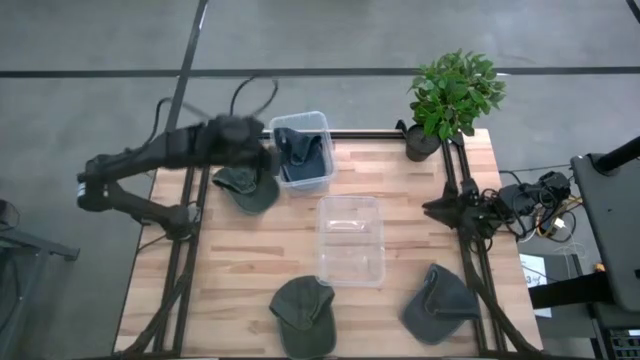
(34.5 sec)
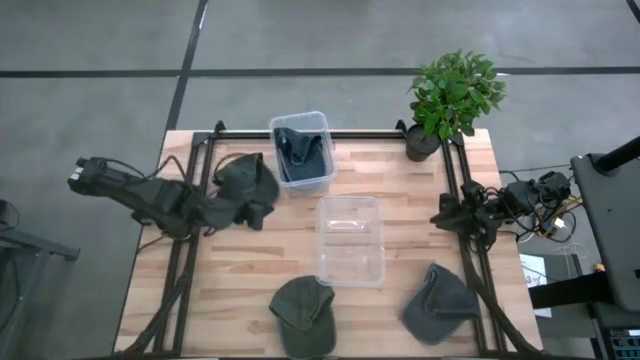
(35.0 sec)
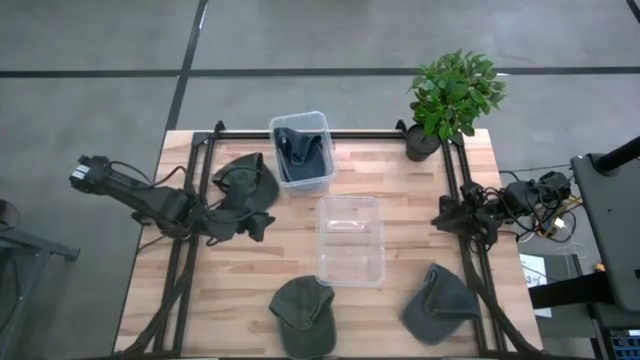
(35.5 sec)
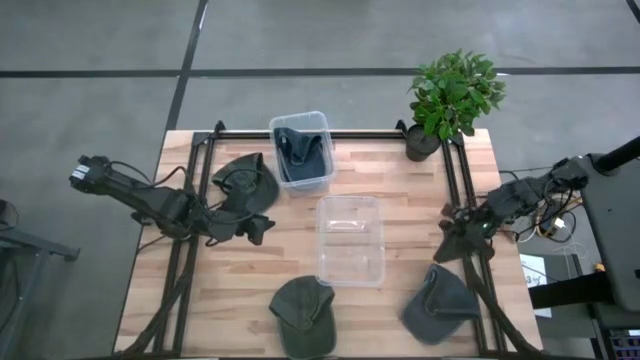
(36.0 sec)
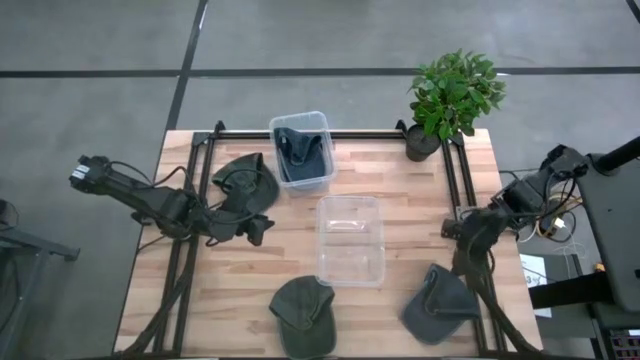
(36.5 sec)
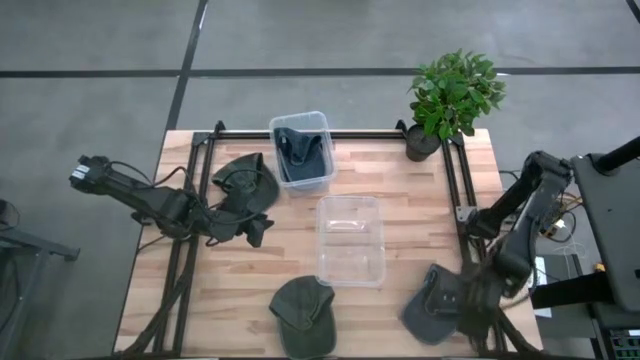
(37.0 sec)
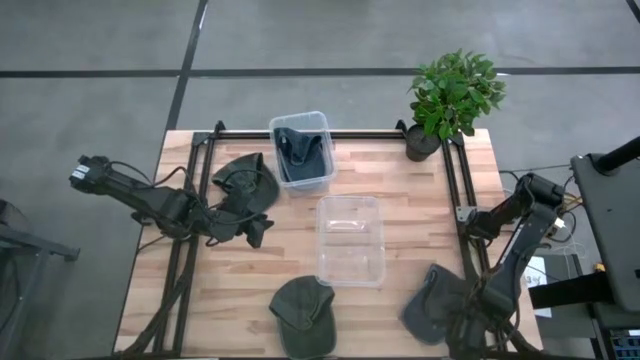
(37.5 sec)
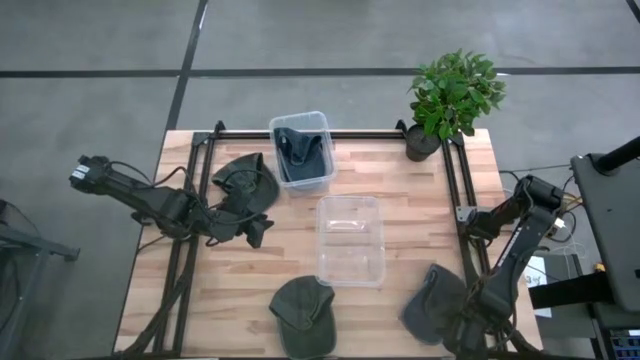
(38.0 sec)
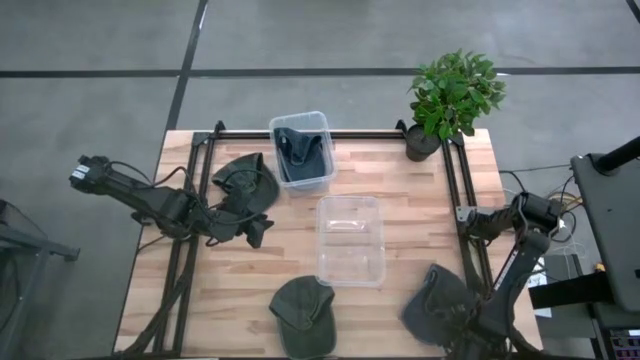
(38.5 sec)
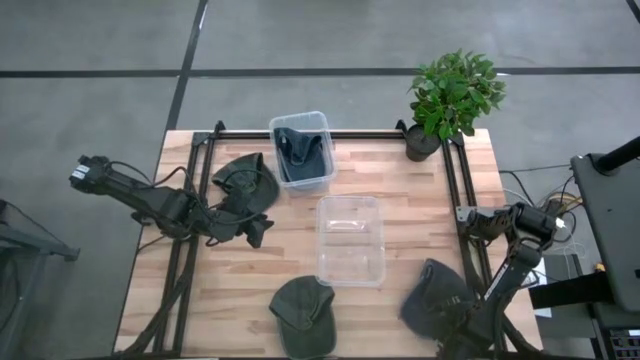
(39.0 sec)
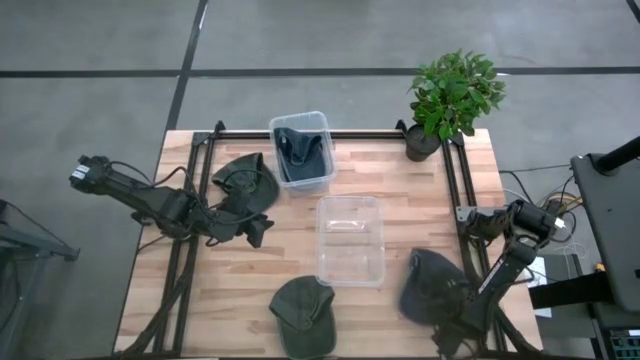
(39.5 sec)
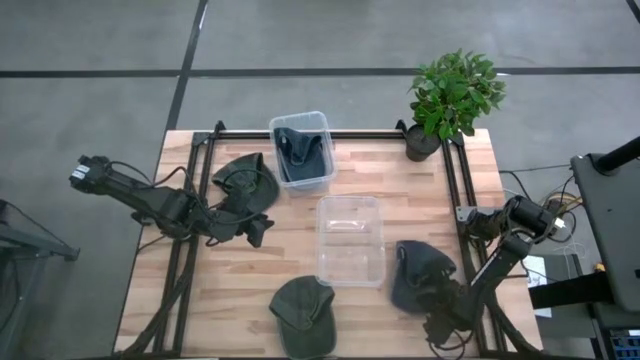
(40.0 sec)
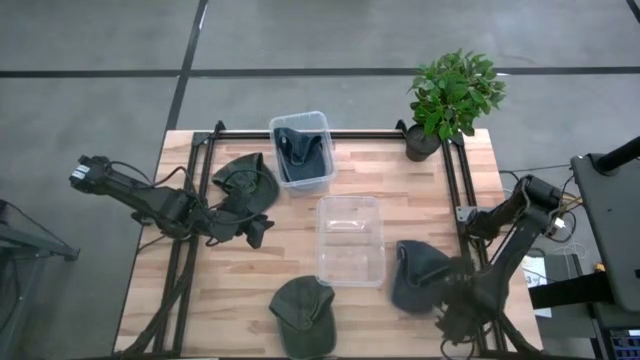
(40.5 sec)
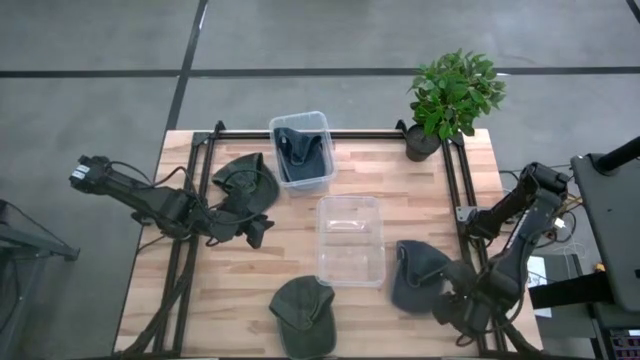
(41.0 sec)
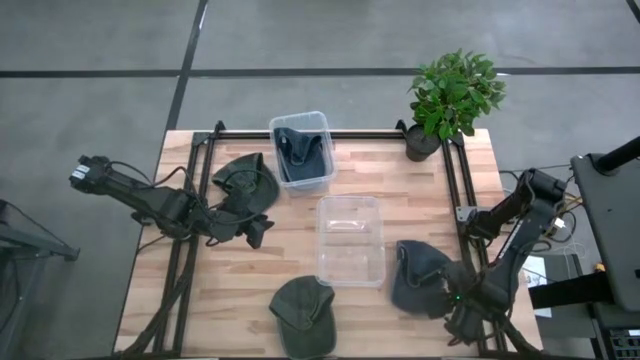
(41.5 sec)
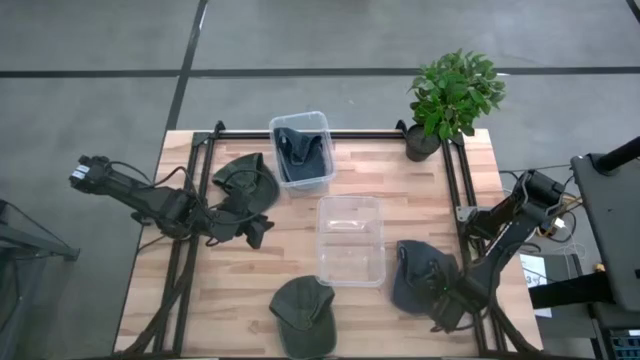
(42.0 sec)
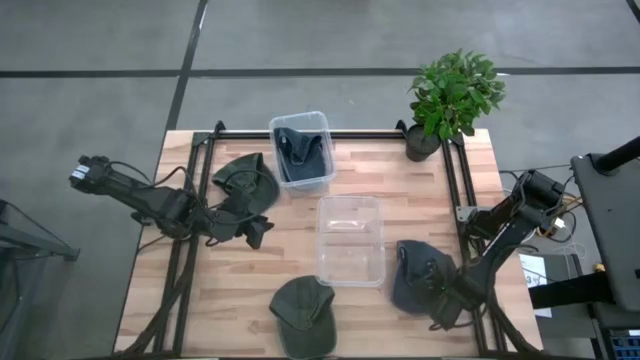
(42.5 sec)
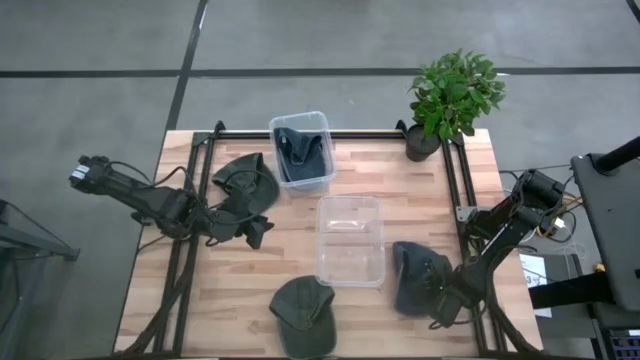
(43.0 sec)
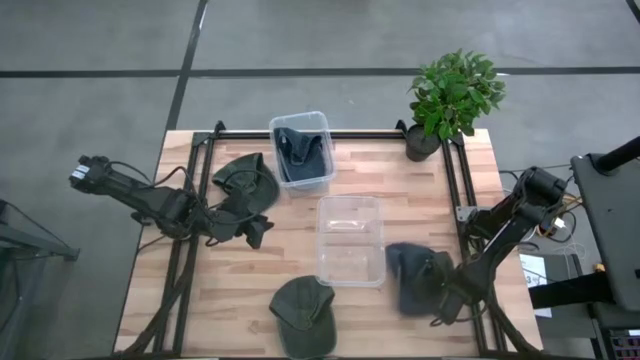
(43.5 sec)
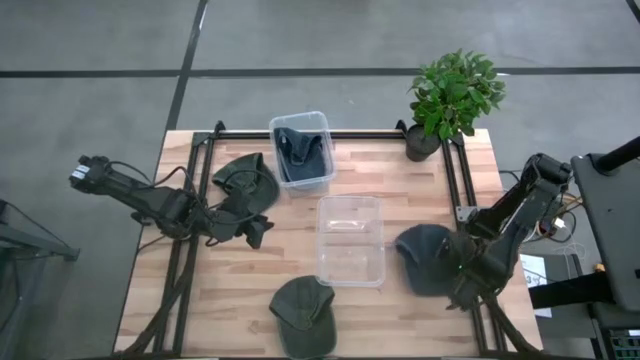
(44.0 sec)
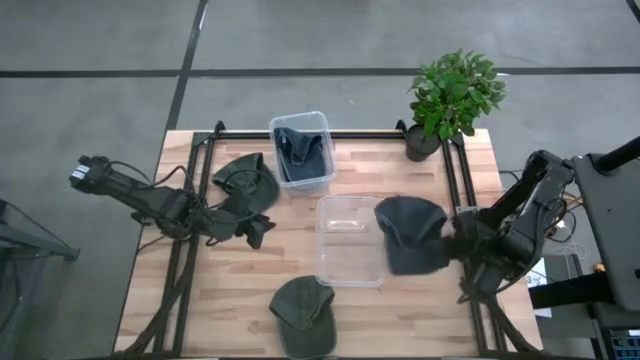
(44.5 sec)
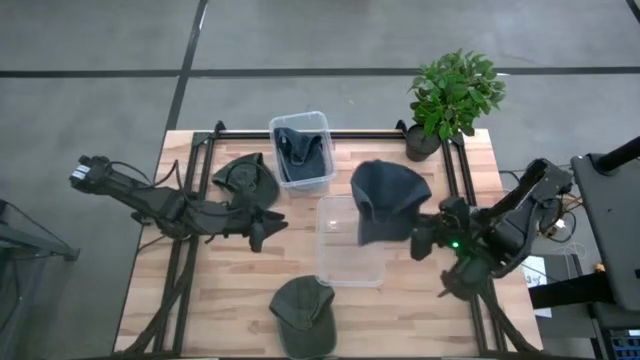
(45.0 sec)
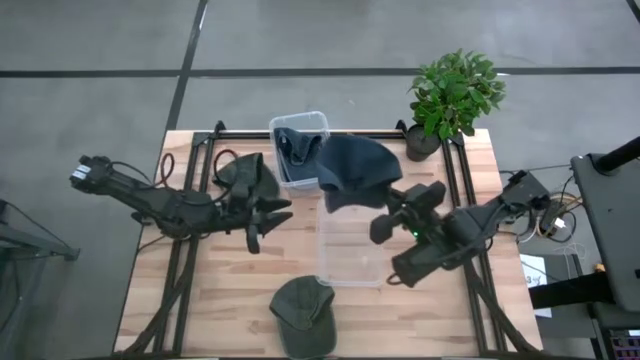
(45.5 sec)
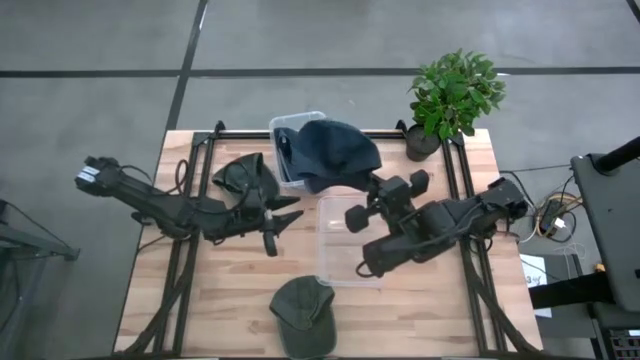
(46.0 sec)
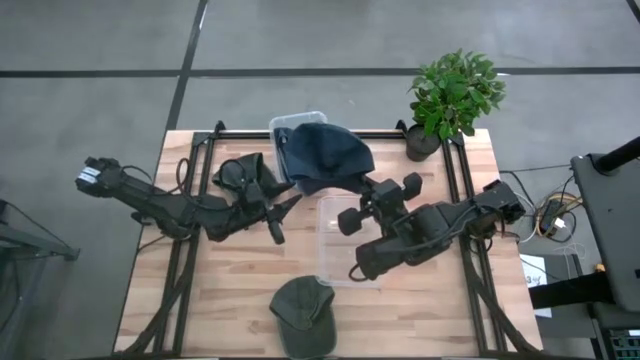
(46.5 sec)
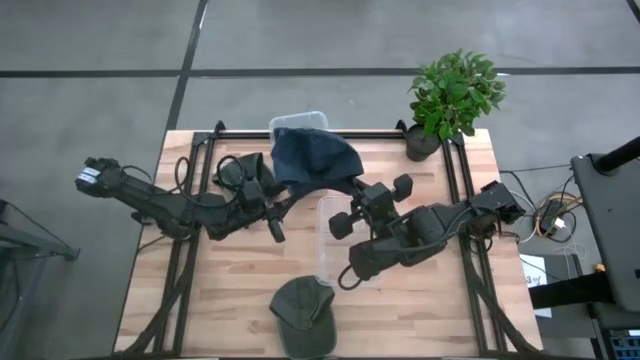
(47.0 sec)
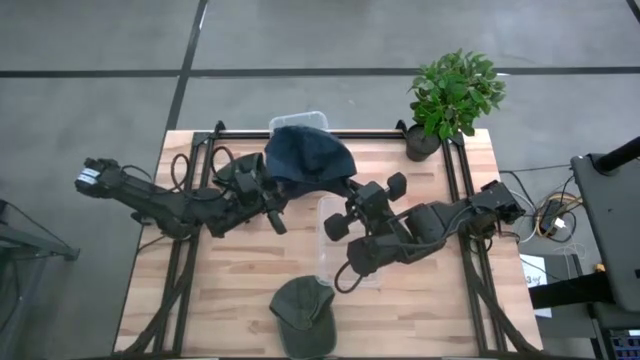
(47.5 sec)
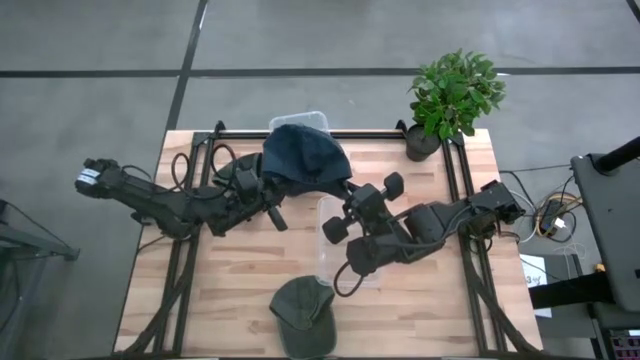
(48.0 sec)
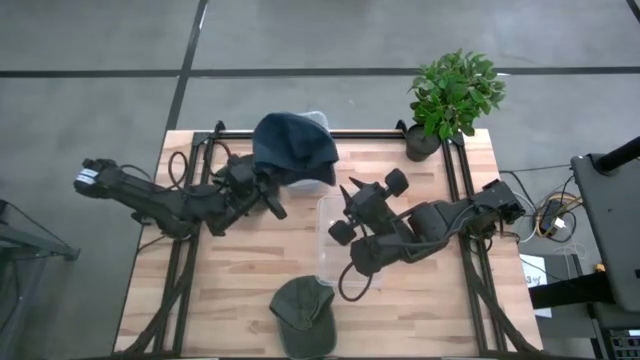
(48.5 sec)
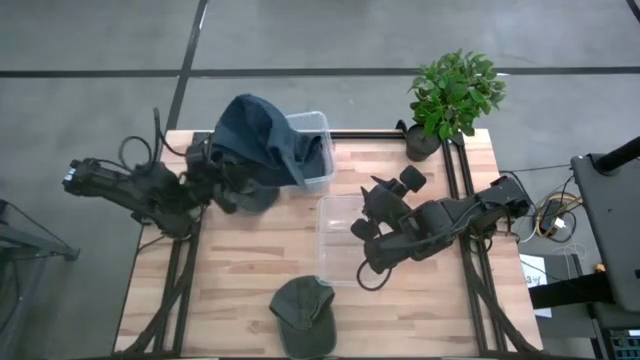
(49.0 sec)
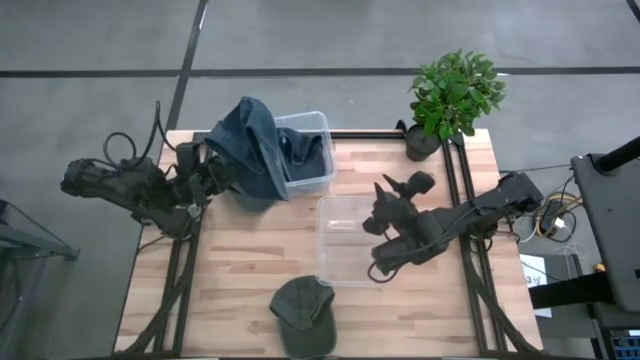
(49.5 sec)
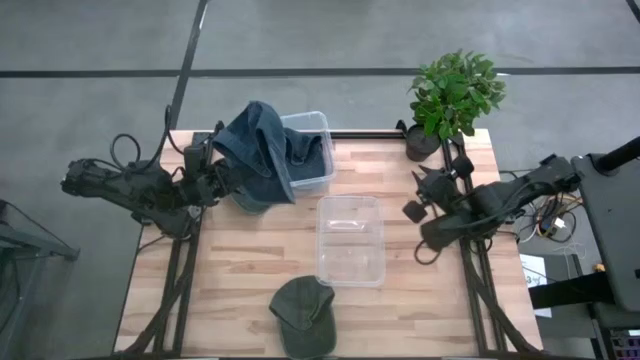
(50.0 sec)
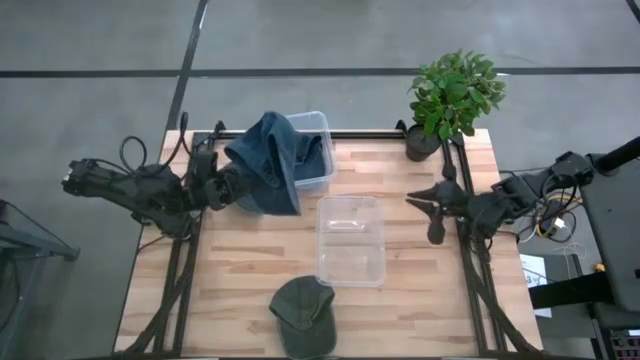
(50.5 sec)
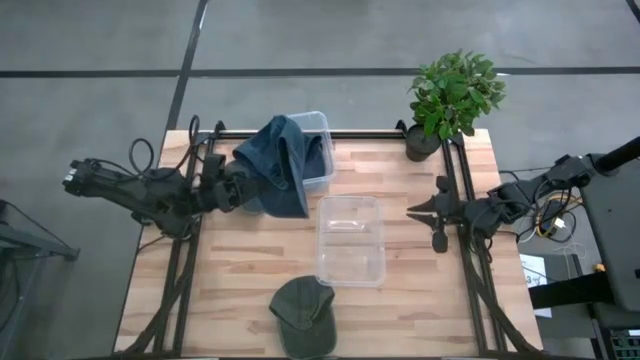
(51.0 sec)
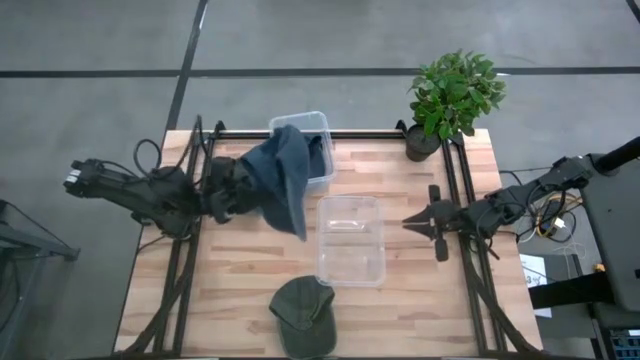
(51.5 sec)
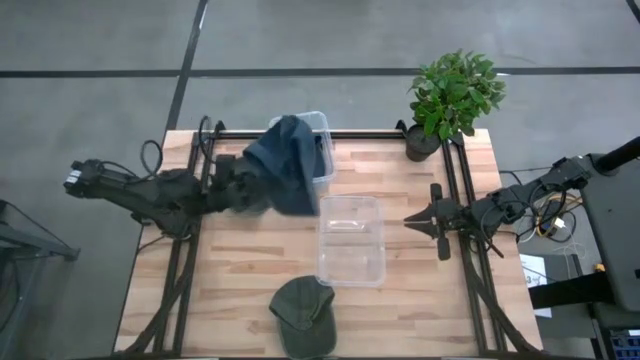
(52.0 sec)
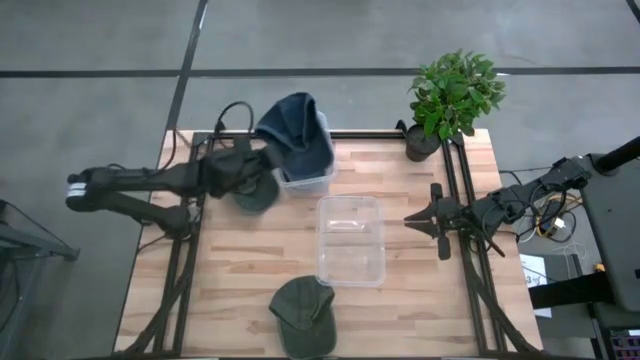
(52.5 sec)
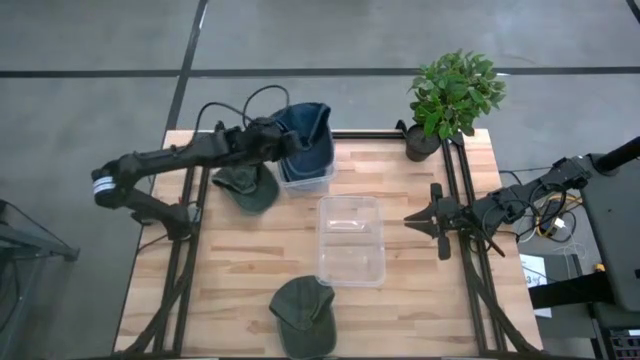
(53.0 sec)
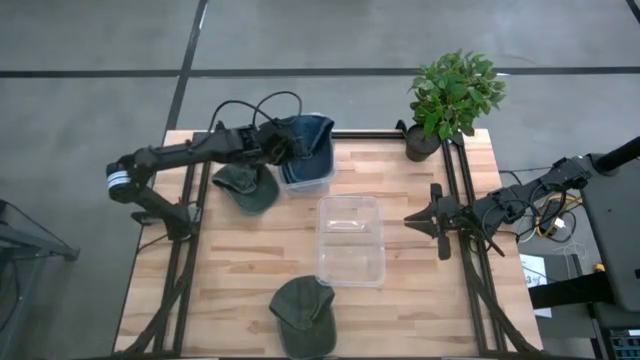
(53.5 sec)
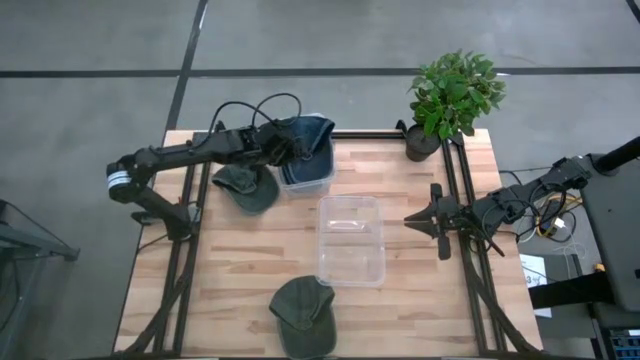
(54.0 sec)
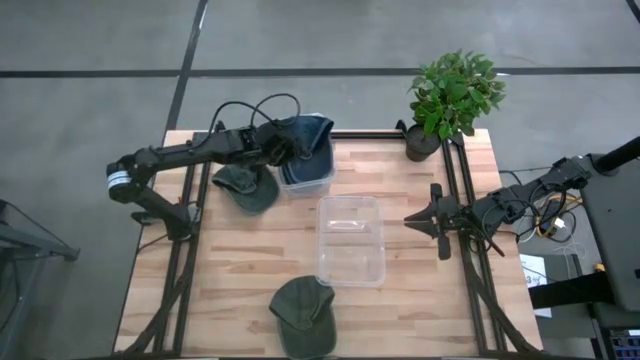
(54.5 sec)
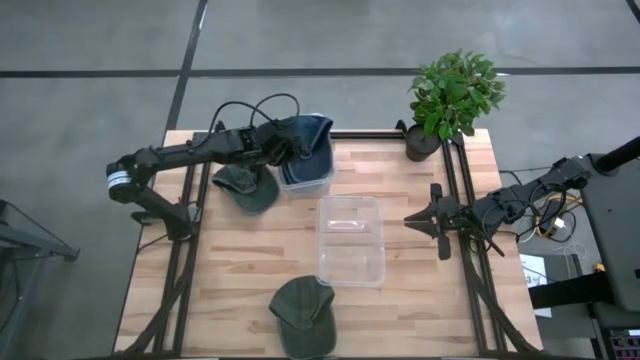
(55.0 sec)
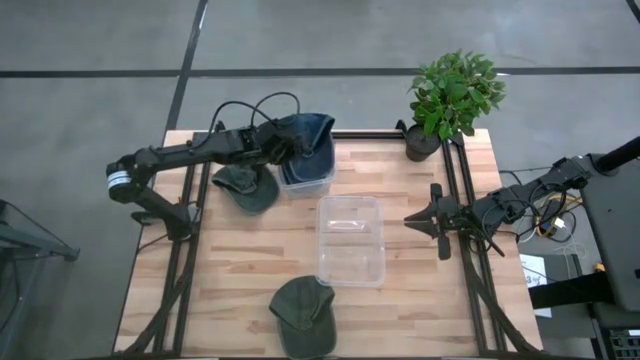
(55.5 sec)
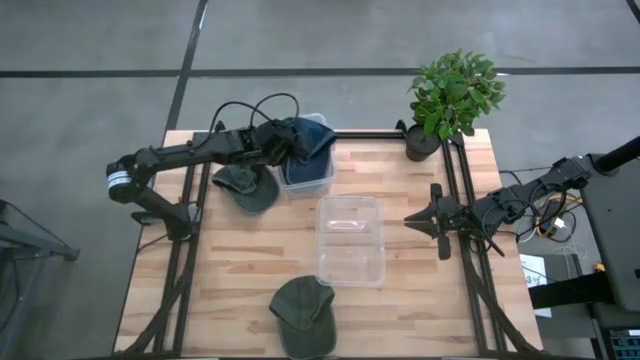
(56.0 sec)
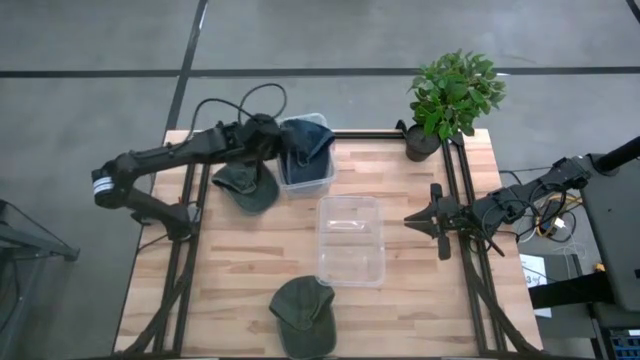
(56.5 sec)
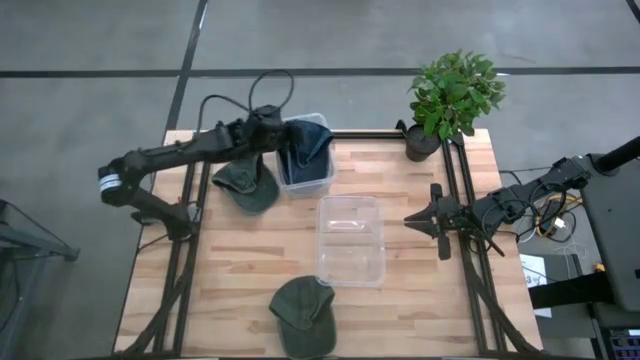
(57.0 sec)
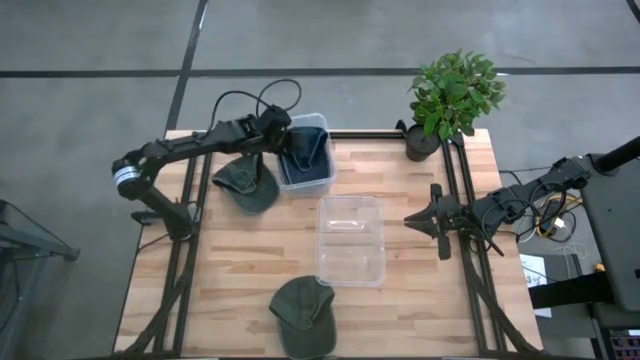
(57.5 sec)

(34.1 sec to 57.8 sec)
Task: Pick & Place hat
Put the blue cap into the top transparent bin
